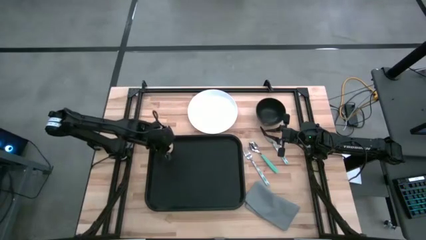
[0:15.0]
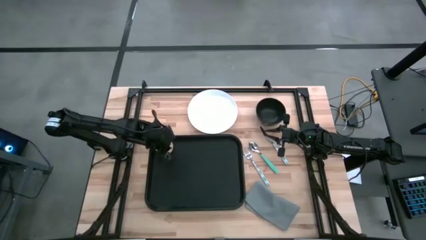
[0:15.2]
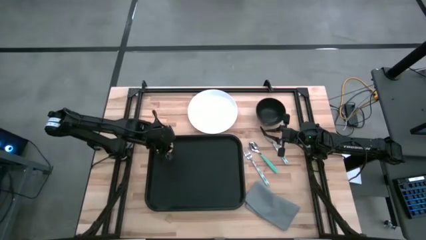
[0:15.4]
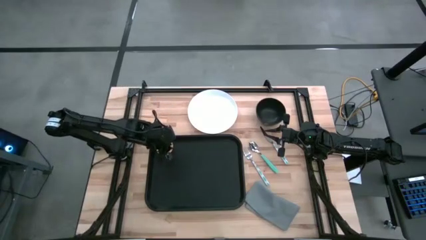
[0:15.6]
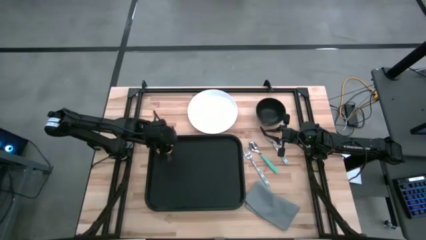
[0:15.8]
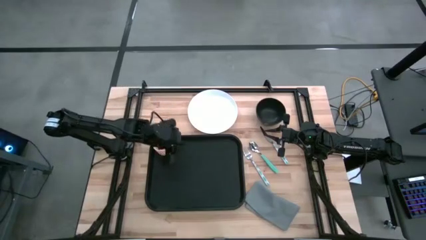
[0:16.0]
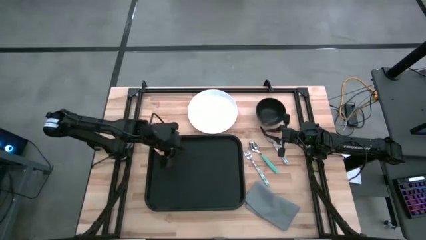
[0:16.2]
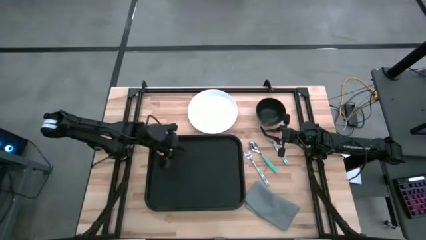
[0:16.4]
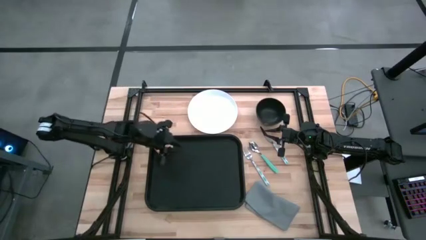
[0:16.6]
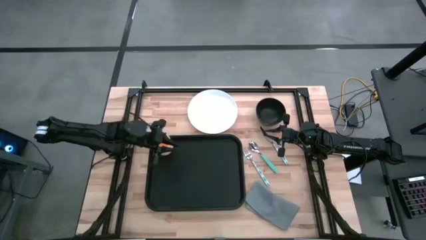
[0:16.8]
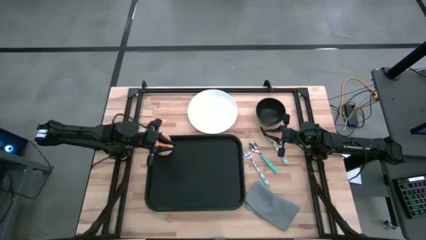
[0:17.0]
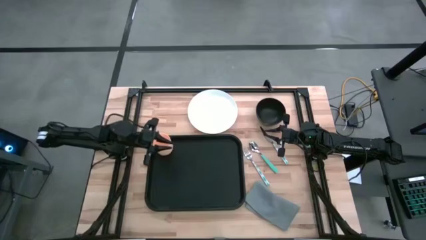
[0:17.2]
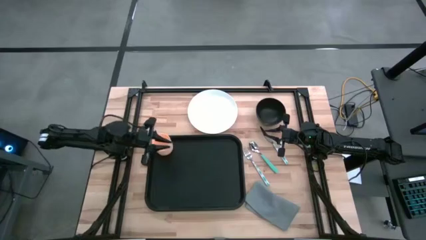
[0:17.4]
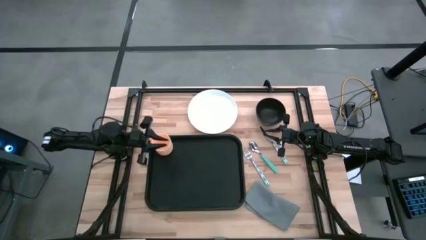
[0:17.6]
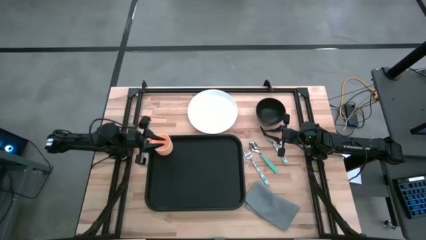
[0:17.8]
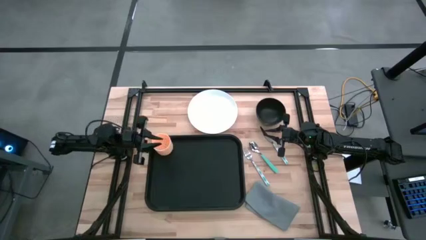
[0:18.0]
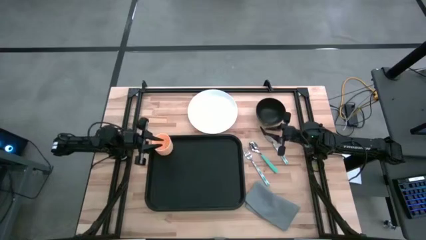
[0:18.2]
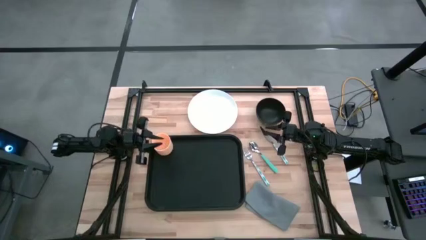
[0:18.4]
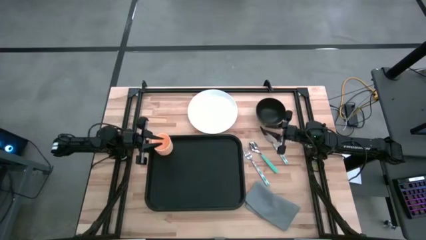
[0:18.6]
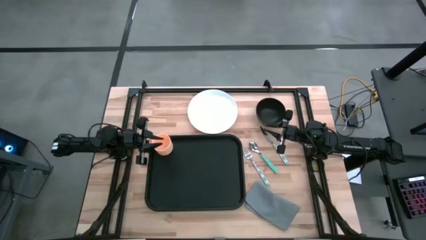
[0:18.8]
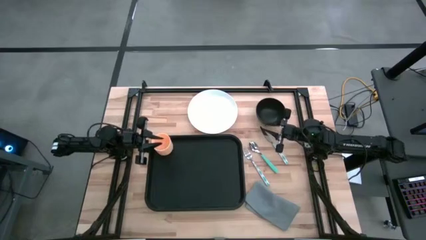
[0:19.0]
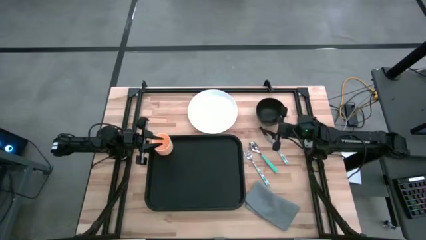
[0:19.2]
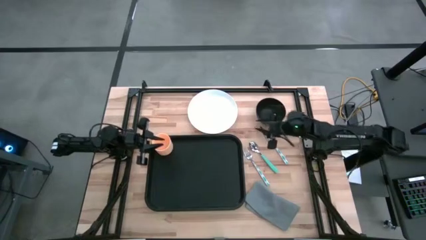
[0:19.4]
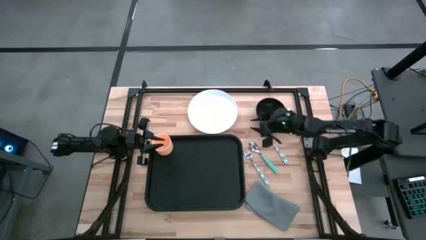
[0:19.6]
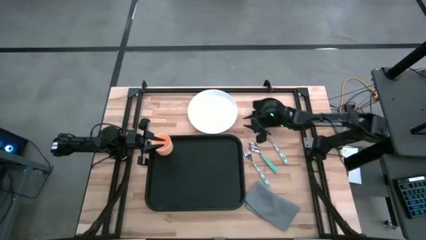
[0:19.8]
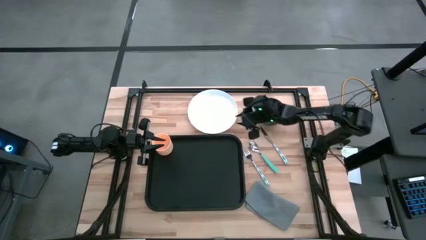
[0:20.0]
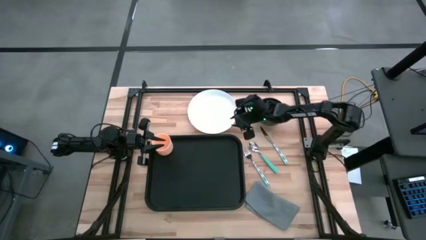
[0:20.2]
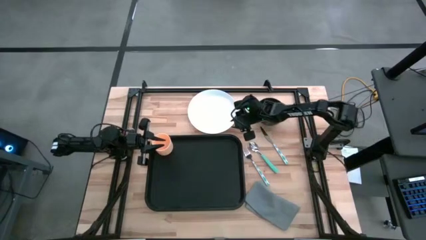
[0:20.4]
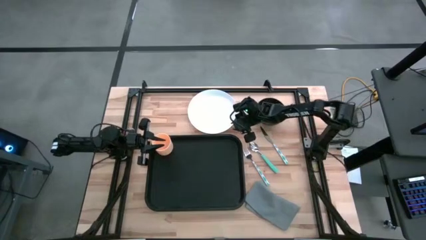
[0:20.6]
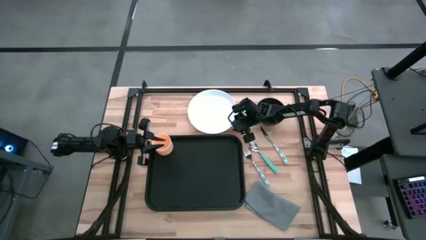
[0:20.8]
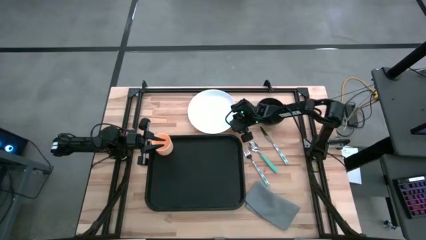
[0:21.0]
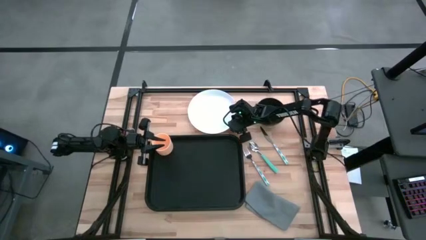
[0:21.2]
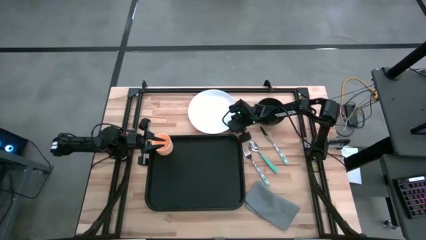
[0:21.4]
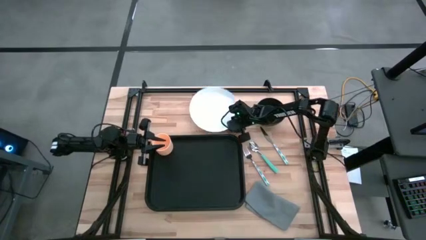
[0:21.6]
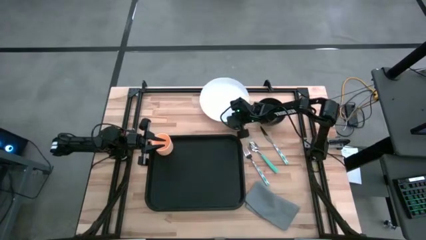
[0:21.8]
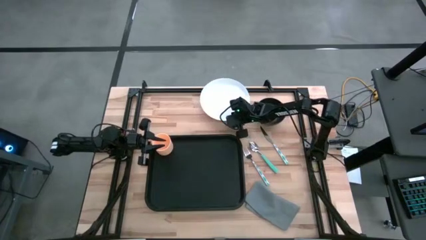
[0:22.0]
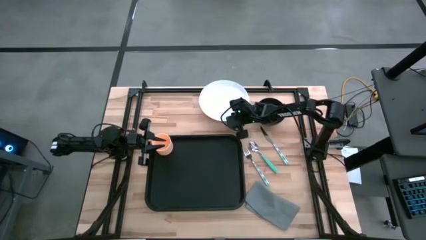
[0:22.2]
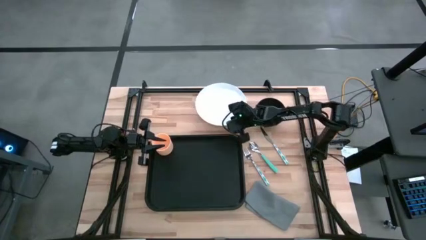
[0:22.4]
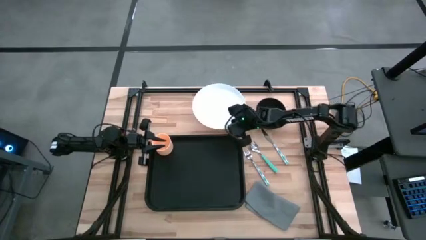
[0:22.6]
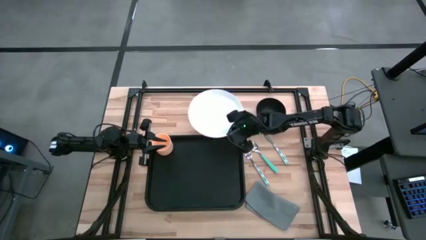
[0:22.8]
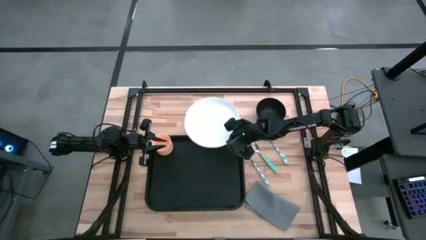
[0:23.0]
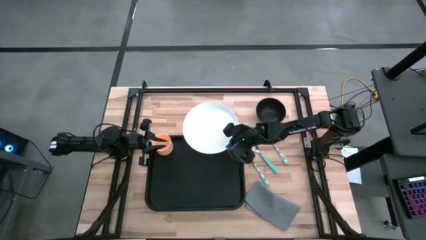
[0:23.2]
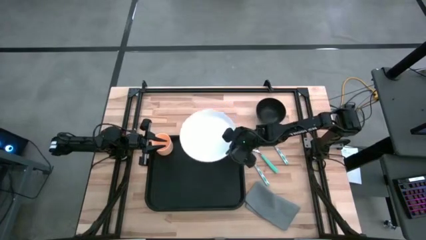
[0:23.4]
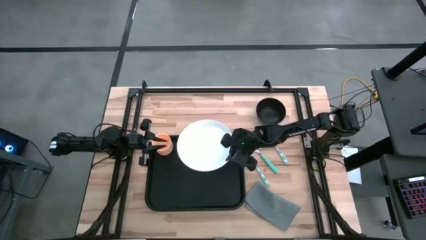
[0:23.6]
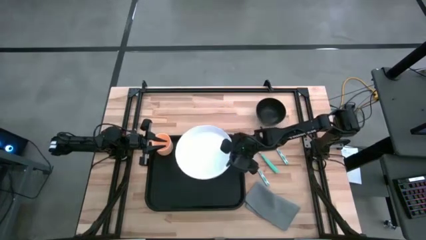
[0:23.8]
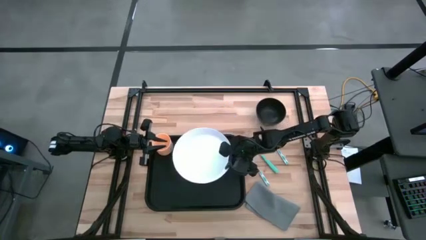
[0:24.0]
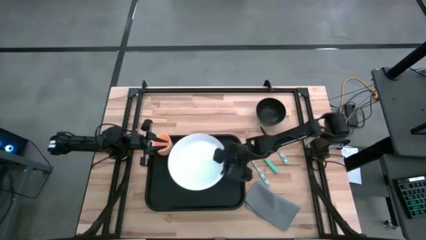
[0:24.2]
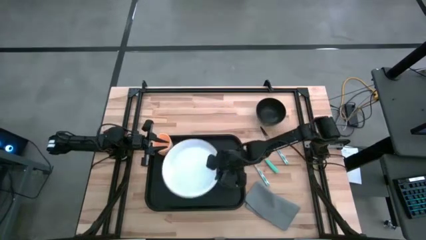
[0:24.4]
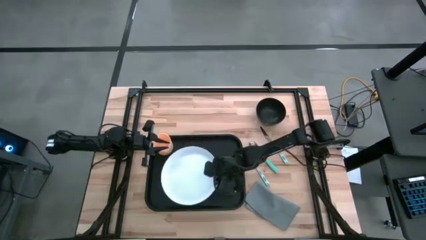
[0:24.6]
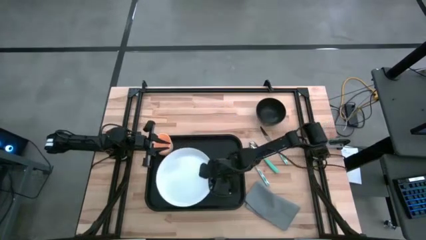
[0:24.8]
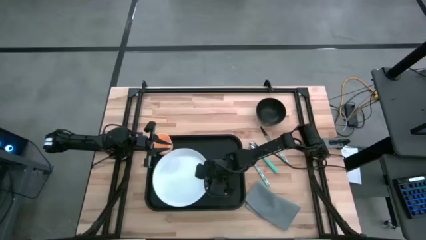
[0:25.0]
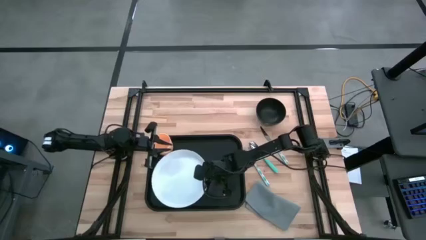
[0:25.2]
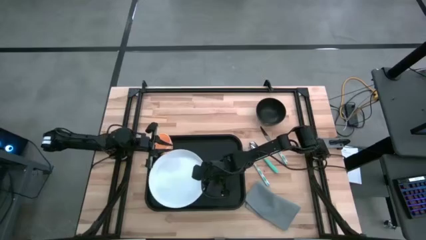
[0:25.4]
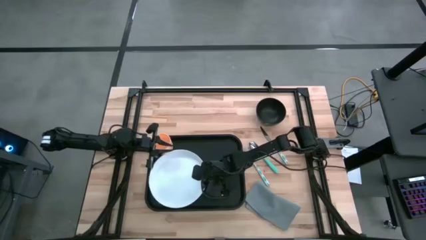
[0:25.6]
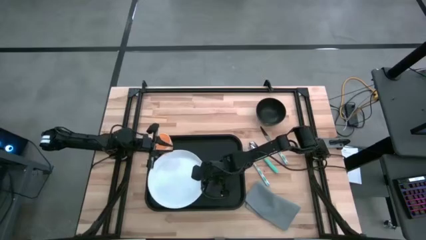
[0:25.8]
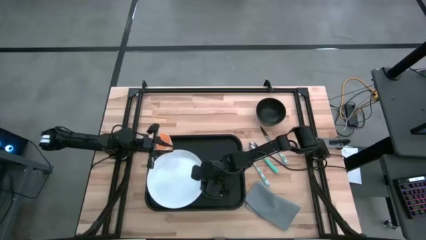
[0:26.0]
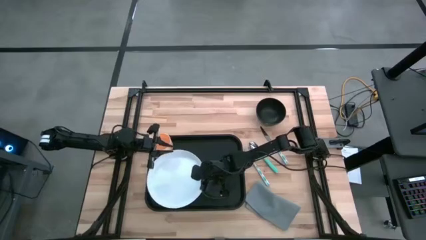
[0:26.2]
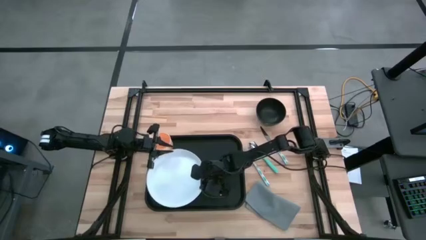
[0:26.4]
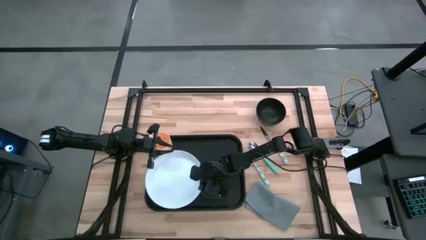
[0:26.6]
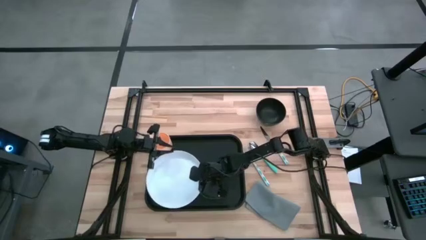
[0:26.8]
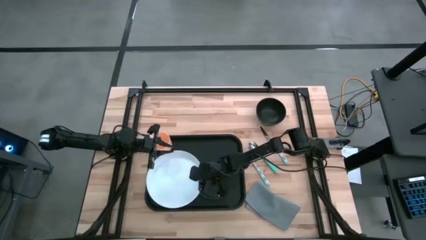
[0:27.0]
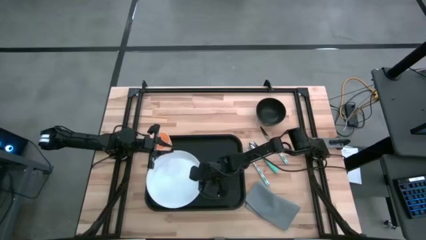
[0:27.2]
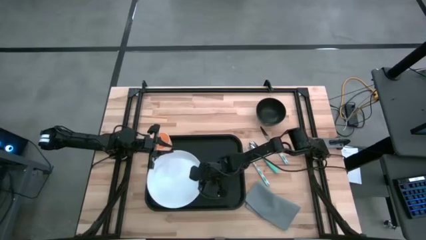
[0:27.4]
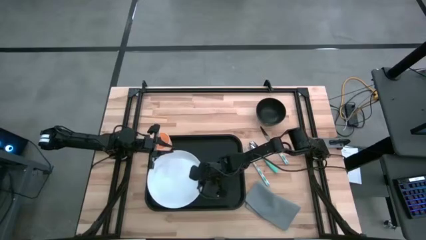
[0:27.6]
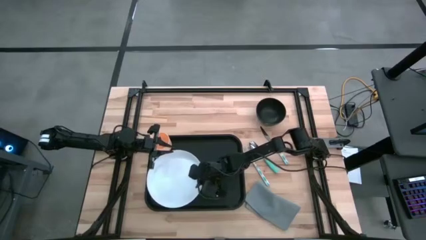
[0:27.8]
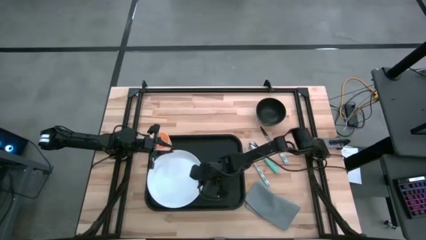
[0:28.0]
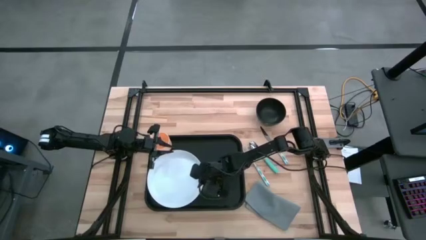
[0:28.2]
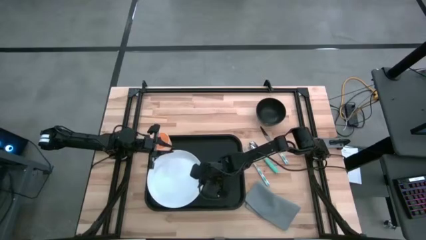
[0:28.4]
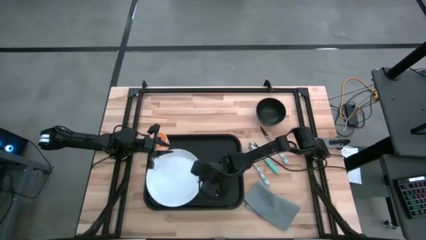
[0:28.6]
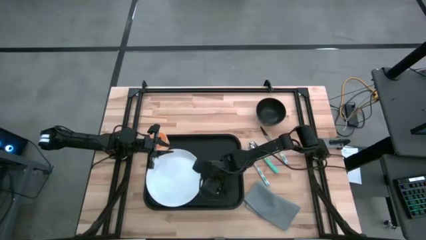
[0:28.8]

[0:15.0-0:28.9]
Task: Set up tray
Put the white plate on the black tray below the orange cup
